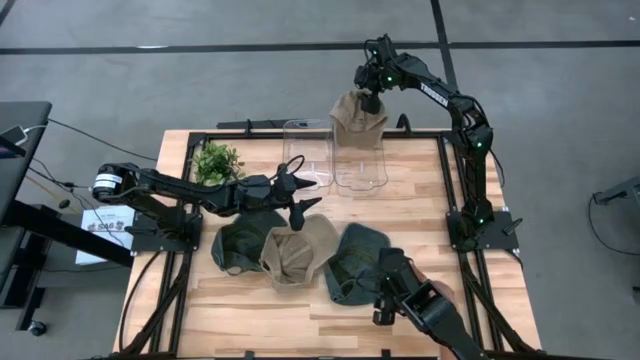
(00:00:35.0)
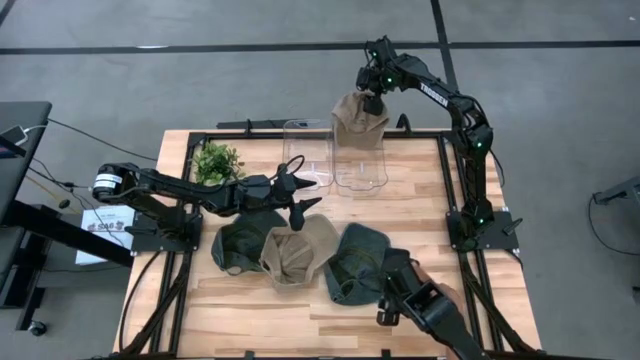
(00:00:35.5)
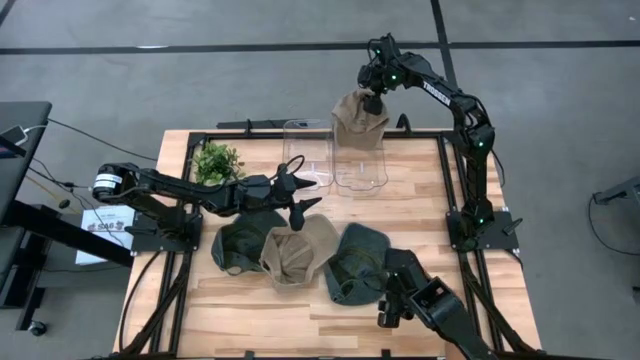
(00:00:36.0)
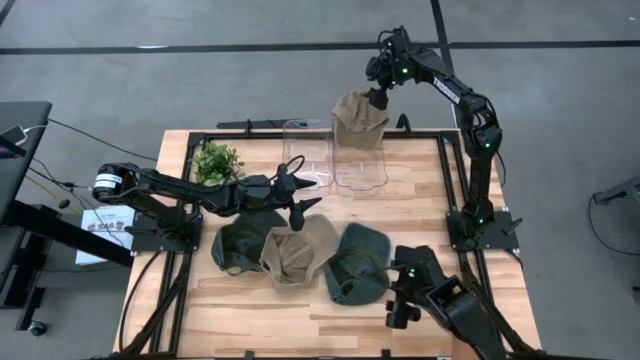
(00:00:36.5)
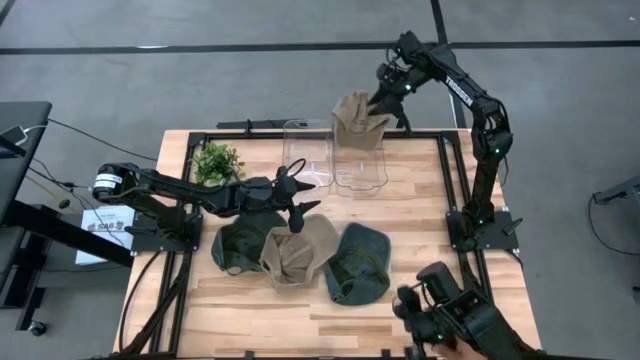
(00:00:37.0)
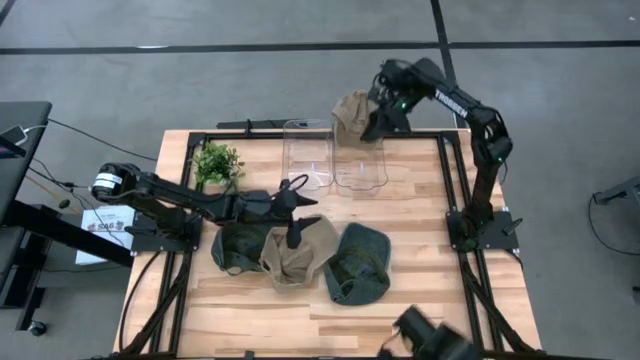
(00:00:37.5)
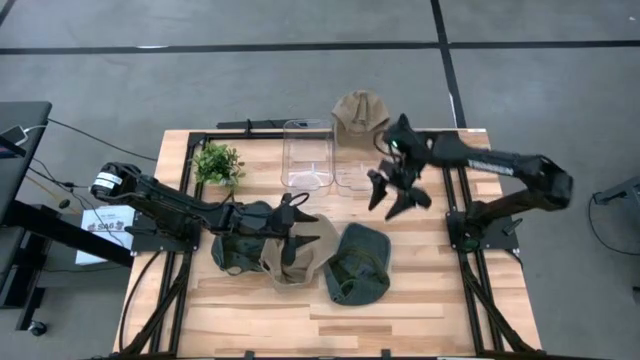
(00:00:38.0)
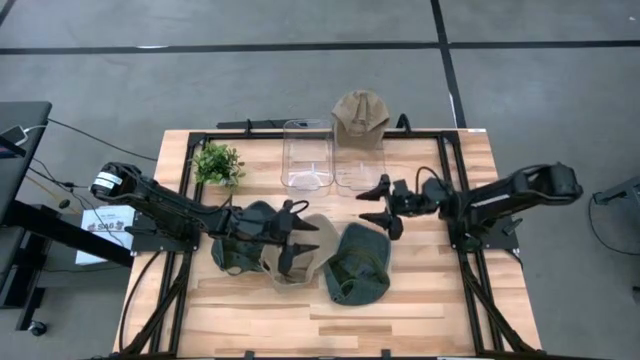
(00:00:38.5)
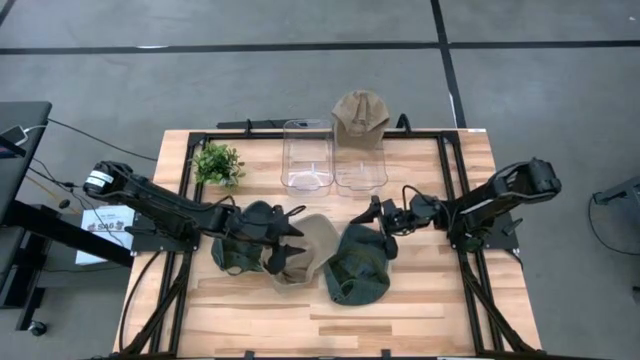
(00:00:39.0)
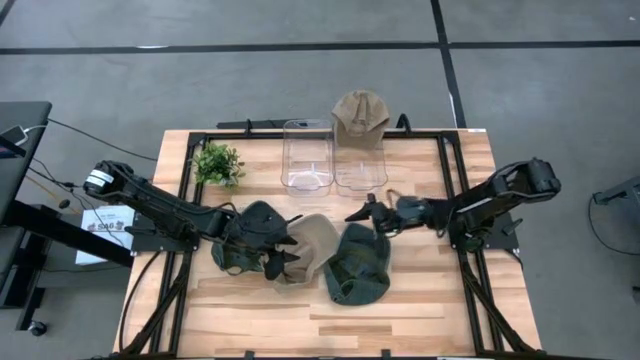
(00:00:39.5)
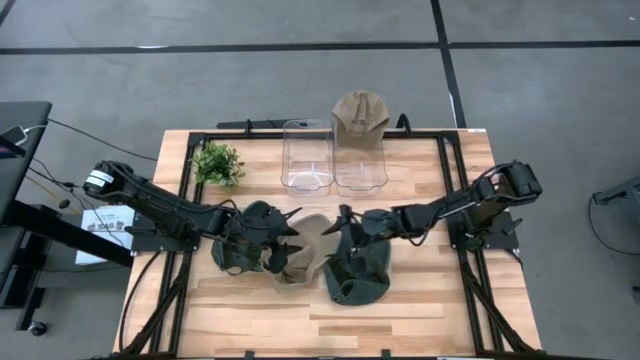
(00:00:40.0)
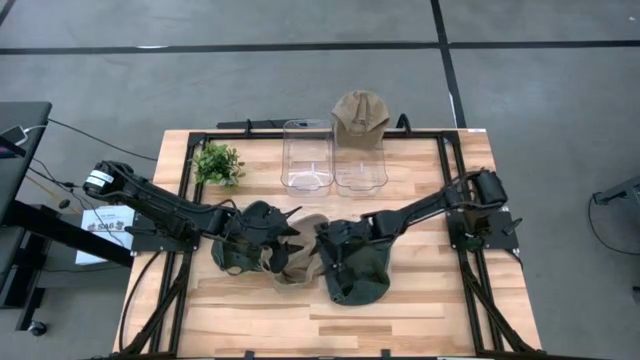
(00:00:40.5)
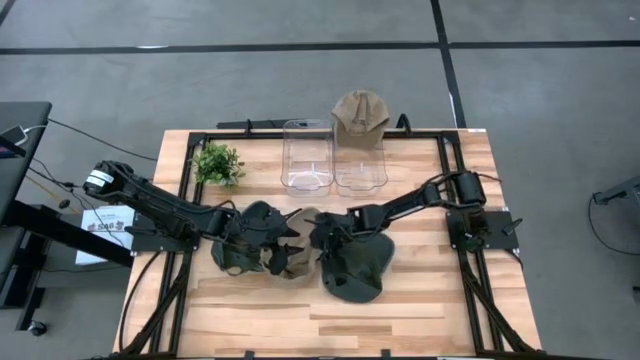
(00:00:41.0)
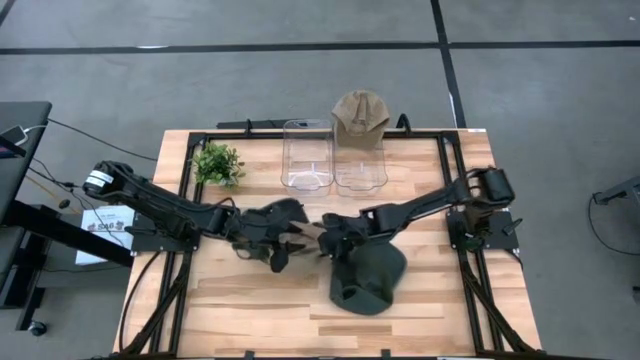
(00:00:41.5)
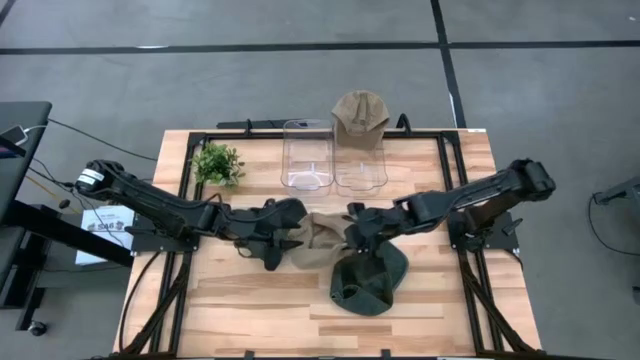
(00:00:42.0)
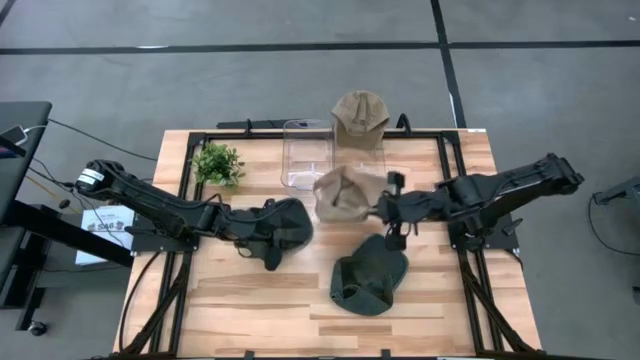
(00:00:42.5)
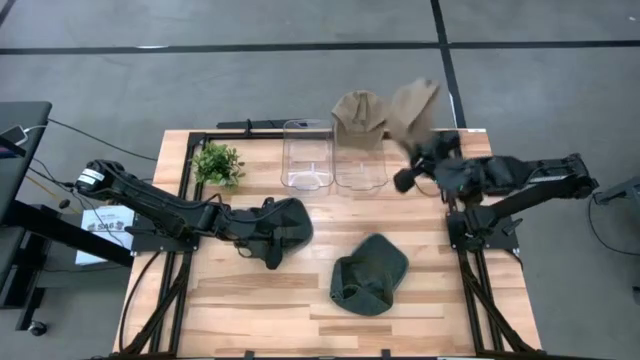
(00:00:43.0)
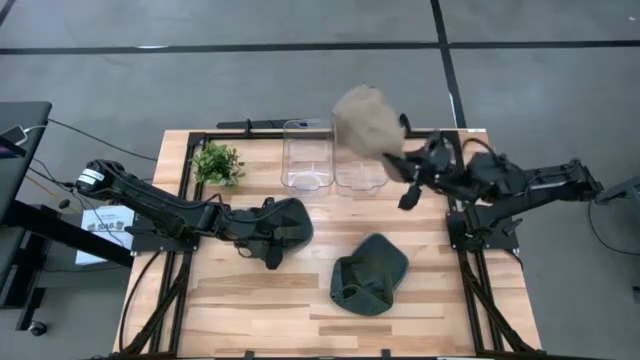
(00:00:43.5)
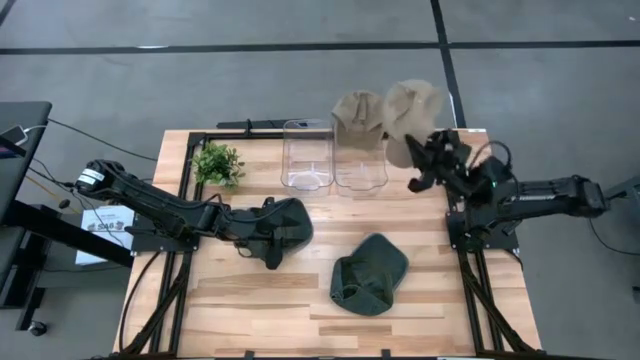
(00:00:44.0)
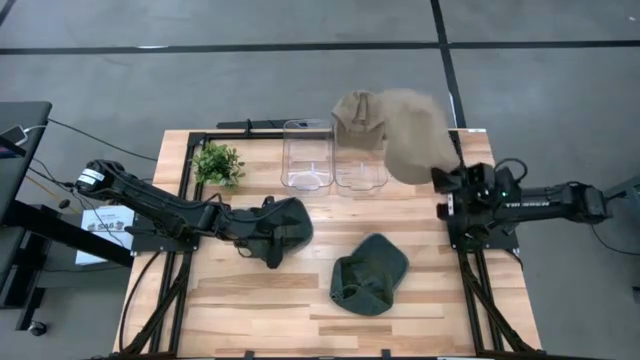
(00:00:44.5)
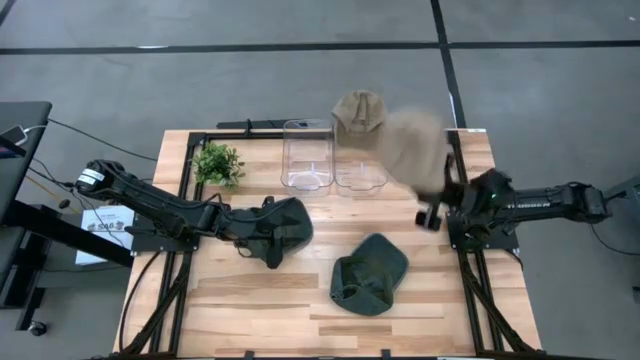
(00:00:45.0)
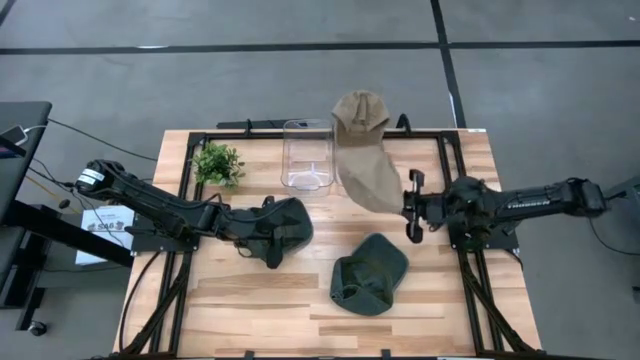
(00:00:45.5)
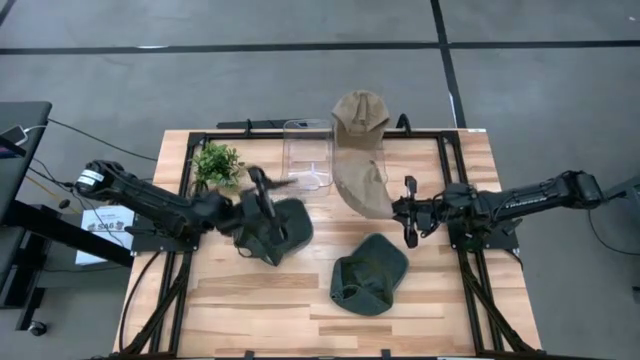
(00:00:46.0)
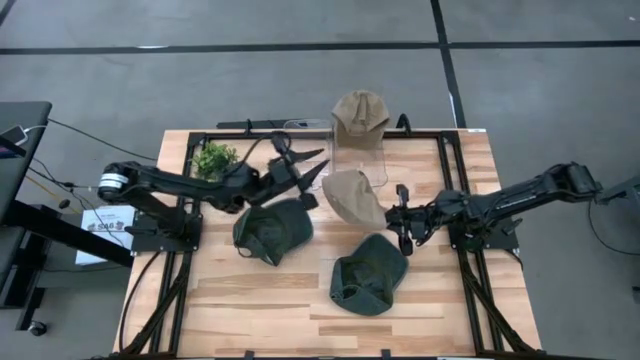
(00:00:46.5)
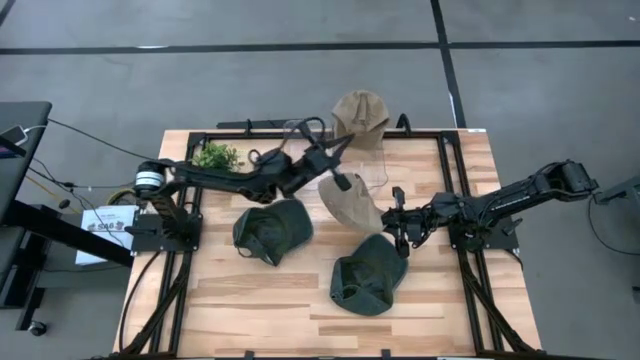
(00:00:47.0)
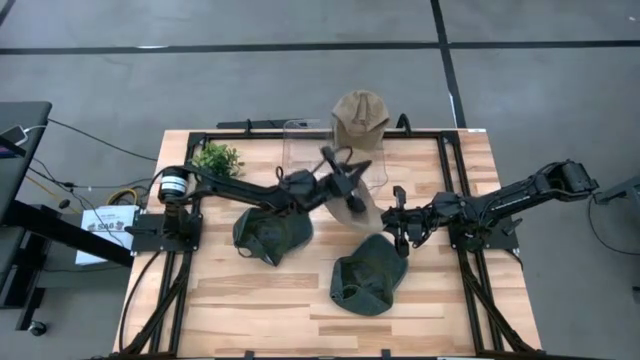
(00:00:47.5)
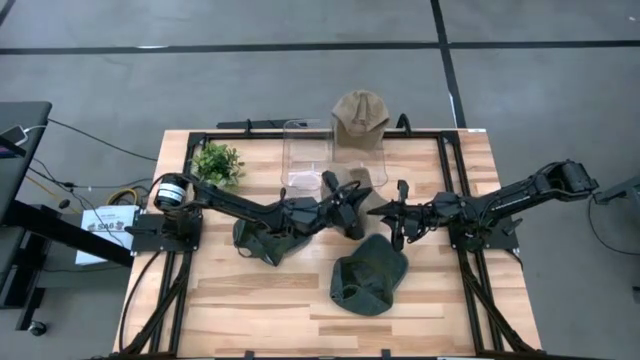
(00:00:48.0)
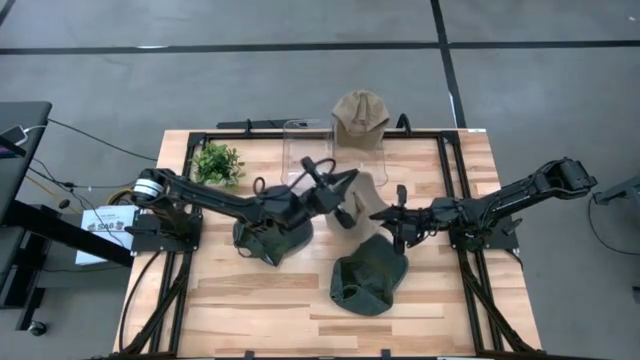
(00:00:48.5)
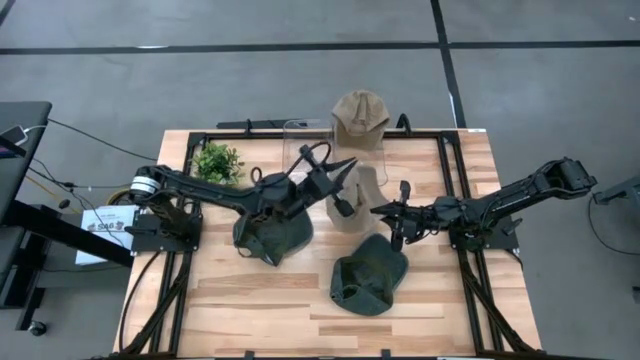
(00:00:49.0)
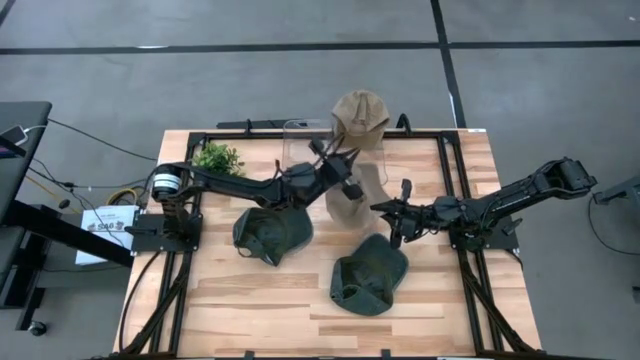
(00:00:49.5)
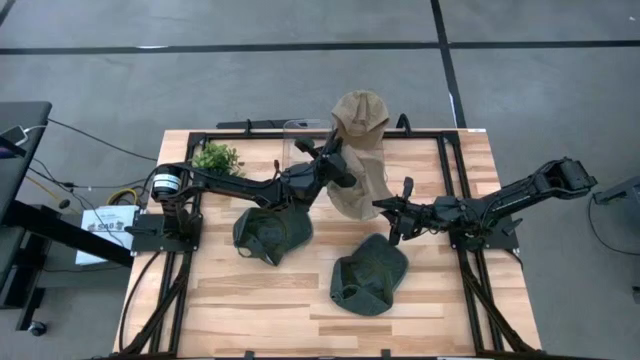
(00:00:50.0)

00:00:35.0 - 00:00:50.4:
Task: Pick & Place hat
Put the brown cap into the right transparent bin

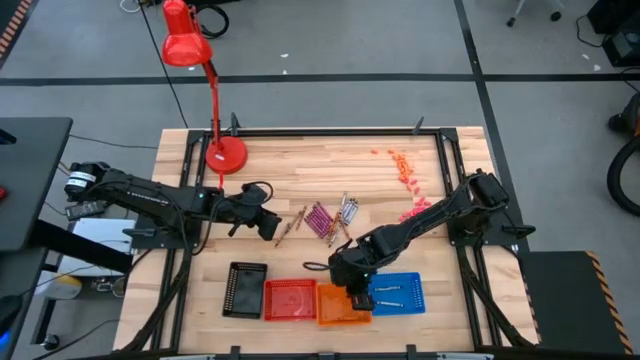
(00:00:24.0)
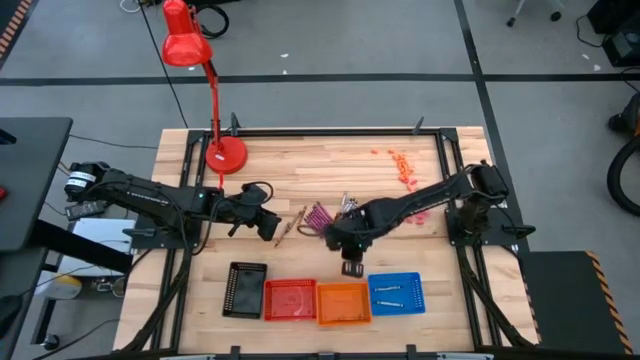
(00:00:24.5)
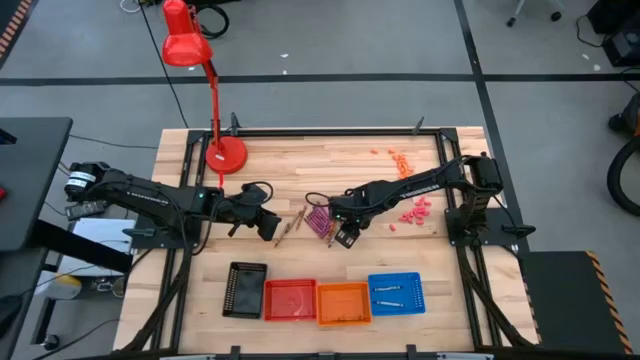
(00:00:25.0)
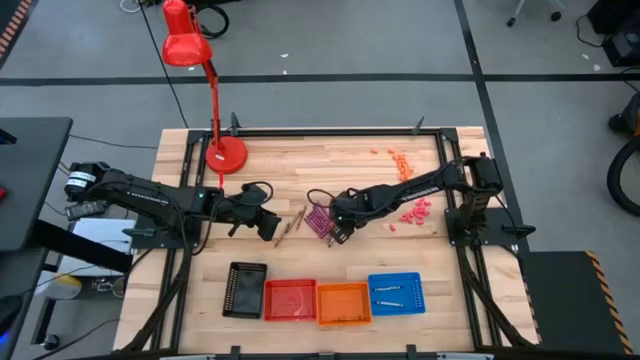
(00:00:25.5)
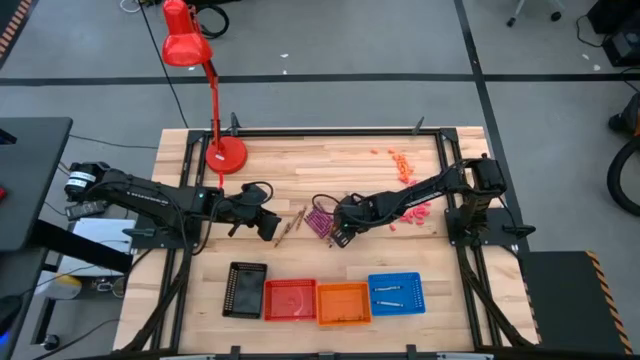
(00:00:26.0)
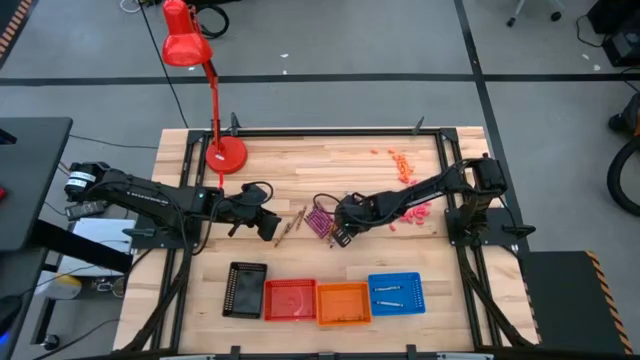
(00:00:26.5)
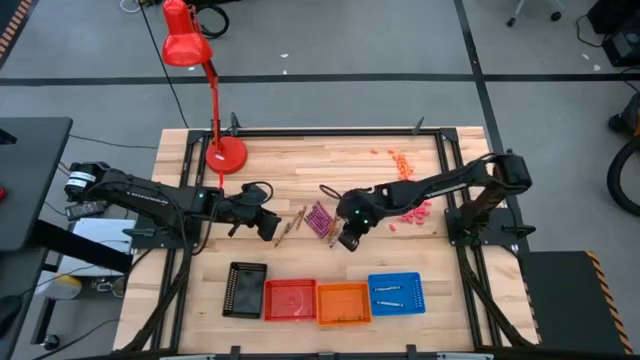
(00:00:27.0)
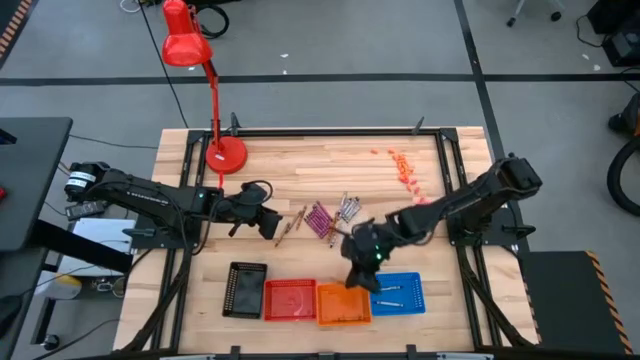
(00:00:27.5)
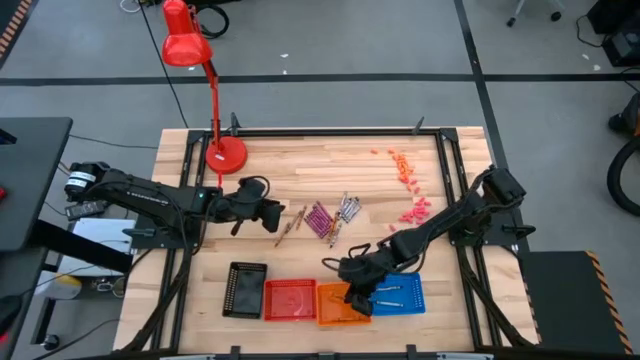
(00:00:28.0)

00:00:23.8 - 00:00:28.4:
Task: Sort crayons
Put the orange crayon into the orange bin
